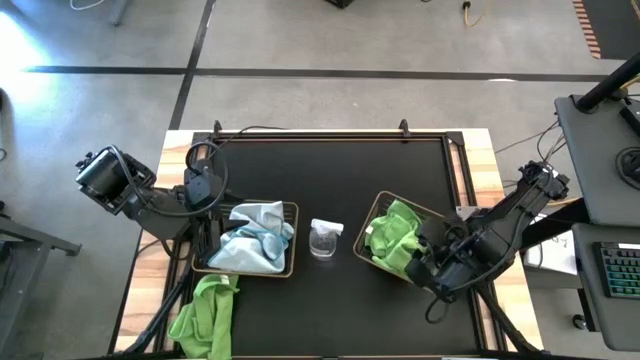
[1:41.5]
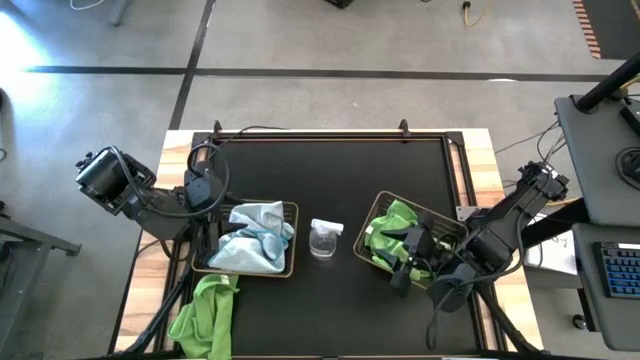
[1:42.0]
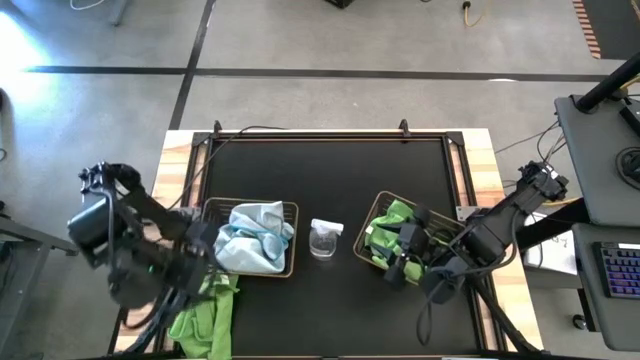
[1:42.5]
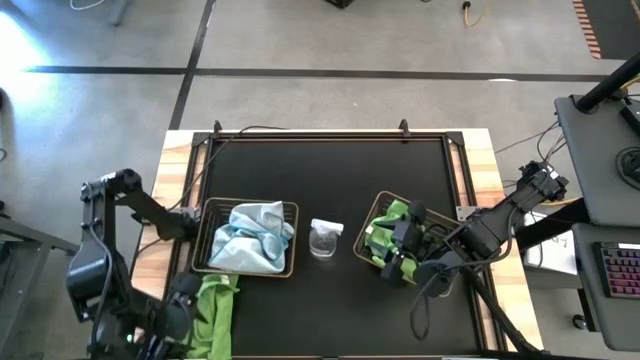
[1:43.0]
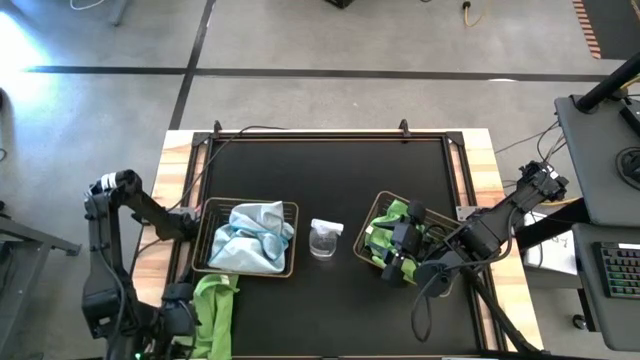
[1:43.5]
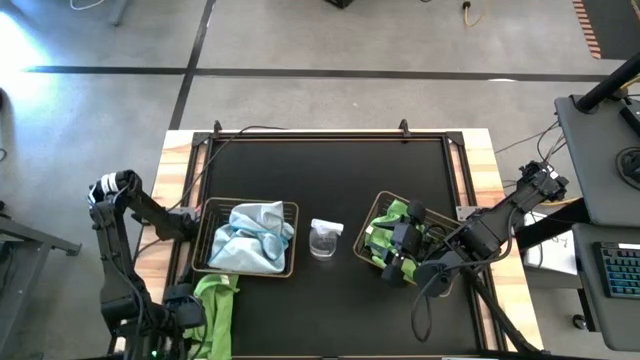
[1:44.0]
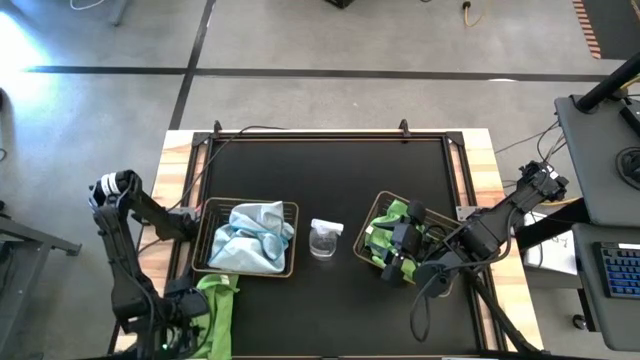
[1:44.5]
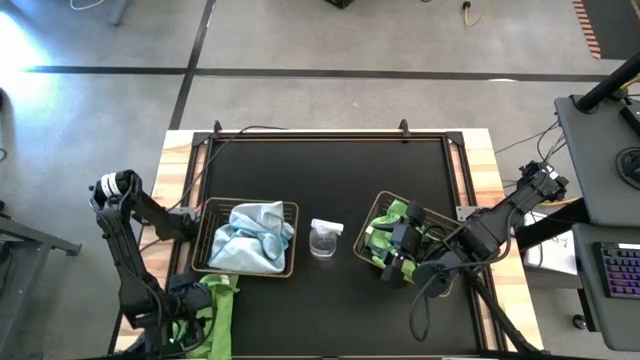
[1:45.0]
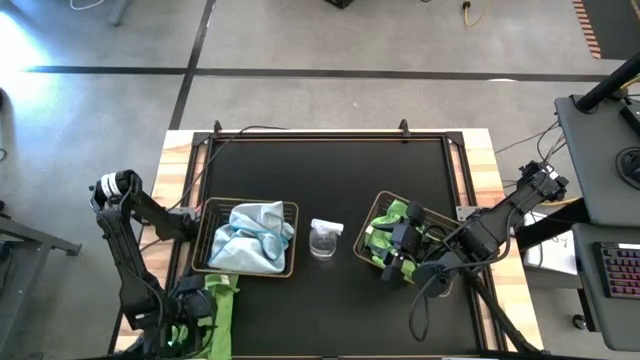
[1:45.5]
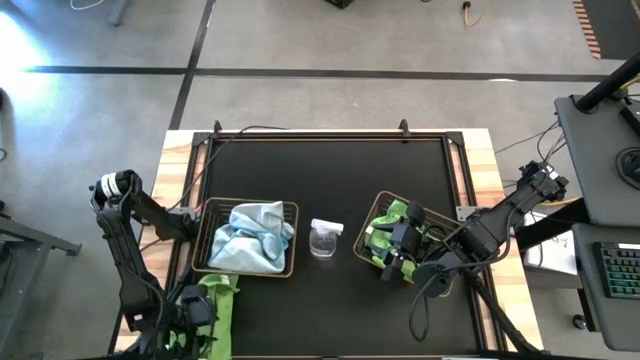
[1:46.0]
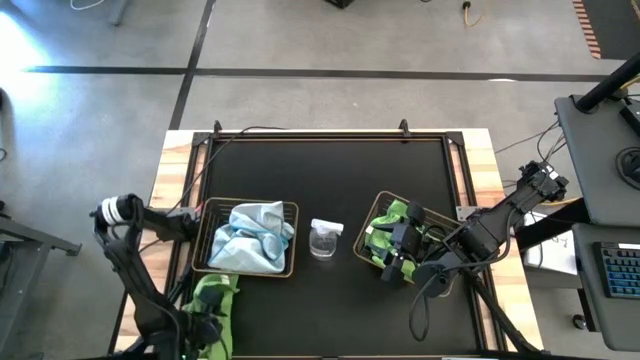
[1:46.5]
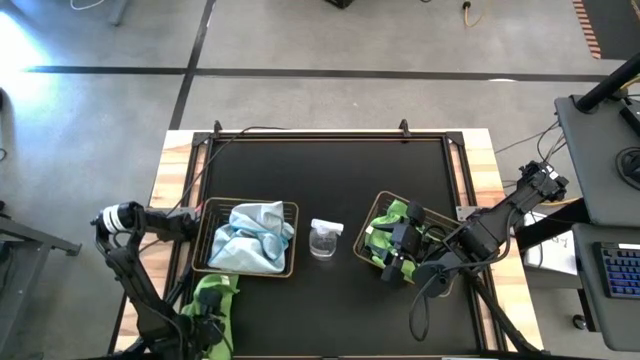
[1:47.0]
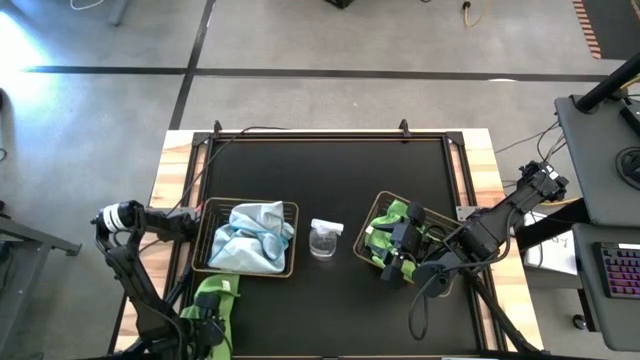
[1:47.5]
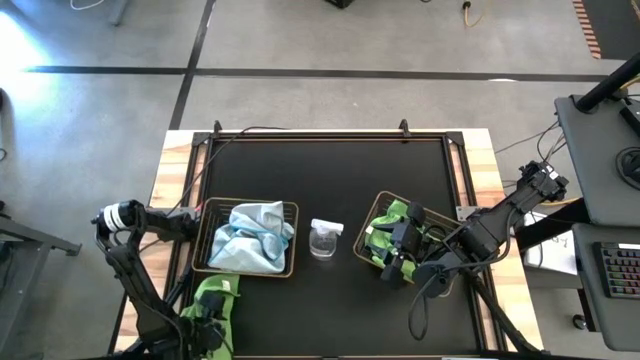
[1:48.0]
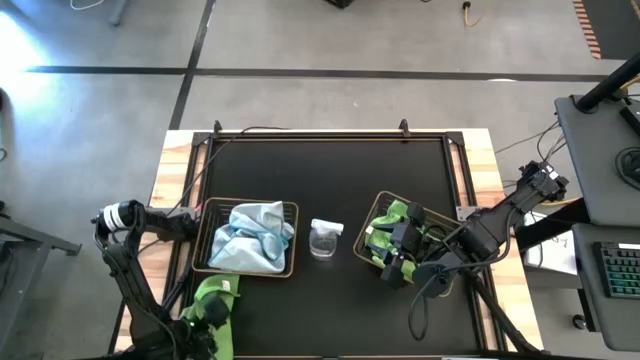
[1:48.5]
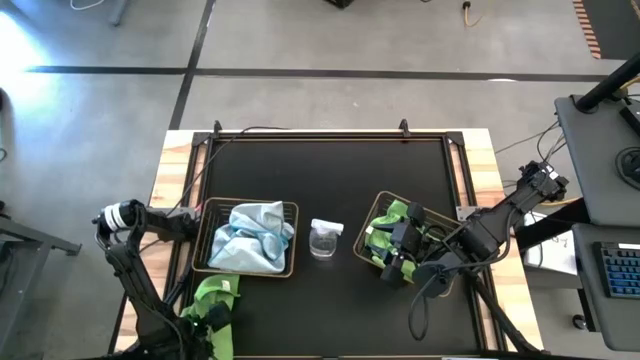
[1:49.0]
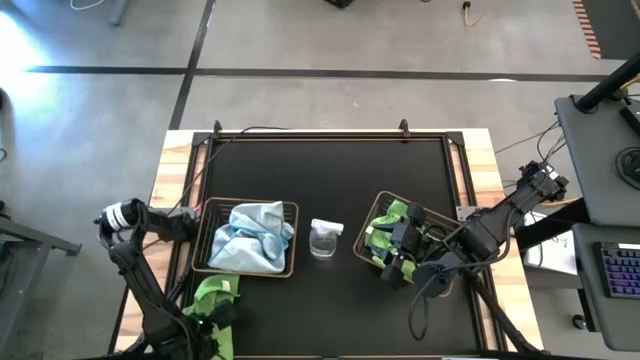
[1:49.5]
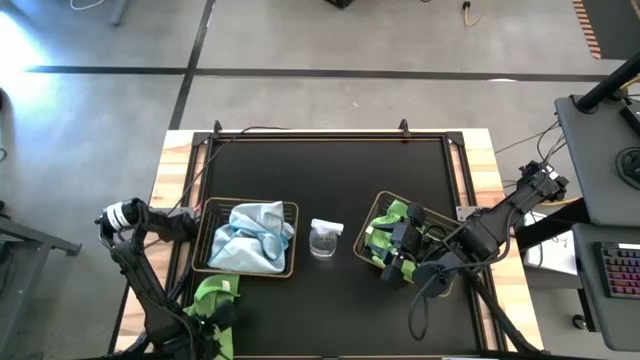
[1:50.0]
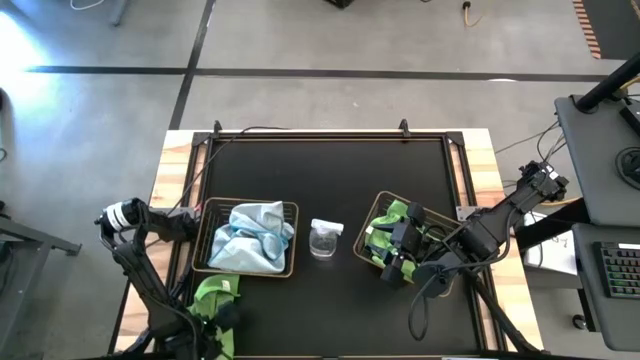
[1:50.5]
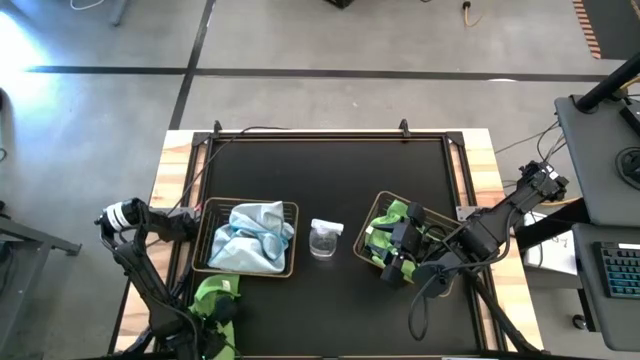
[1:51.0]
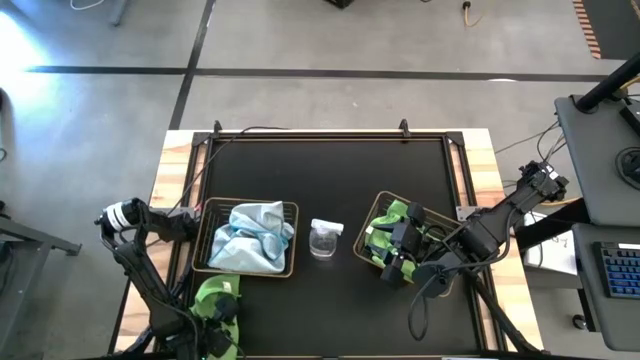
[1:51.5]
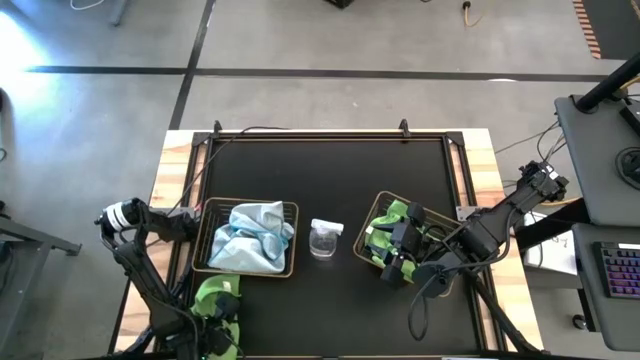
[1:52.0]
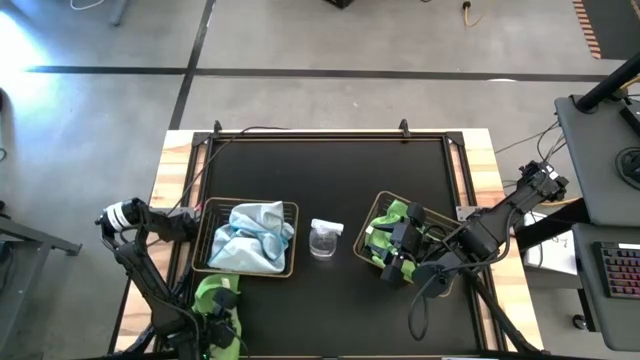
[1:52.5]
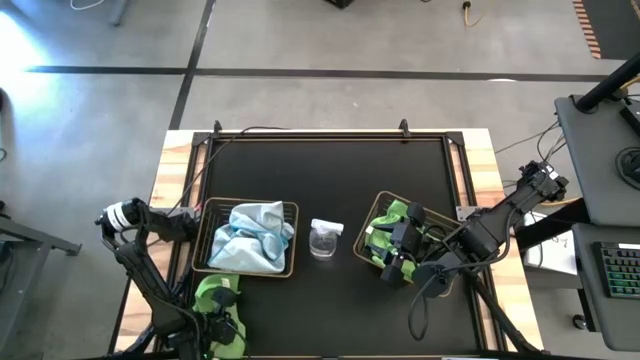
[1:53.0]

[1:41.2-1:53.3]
Task: Sort microfiber towel by color & place in baskets
Put the green microfiber towel into the right wire basket

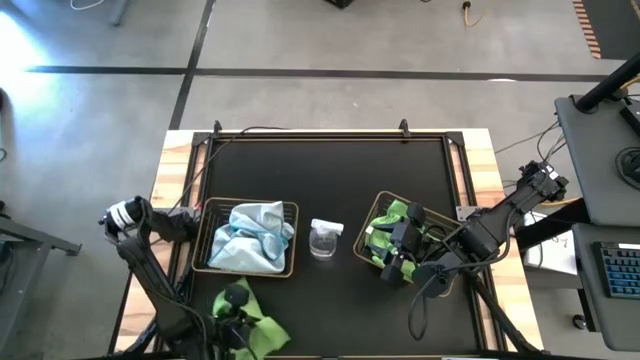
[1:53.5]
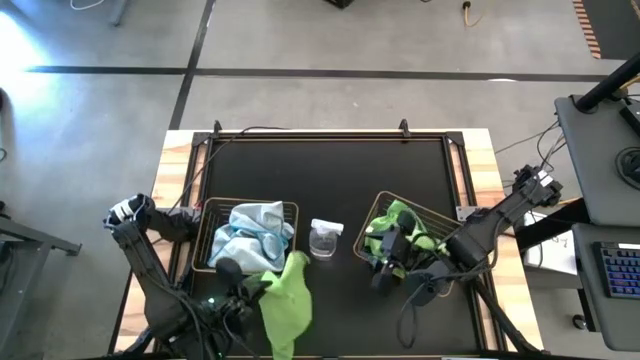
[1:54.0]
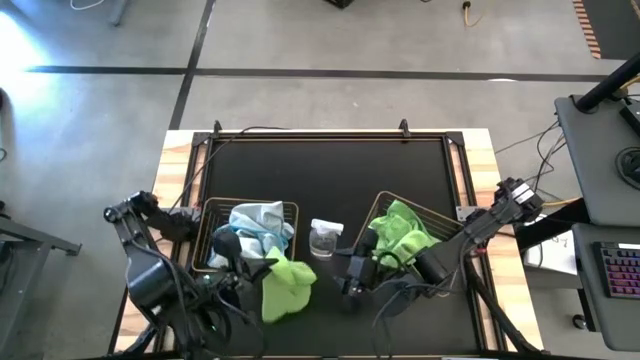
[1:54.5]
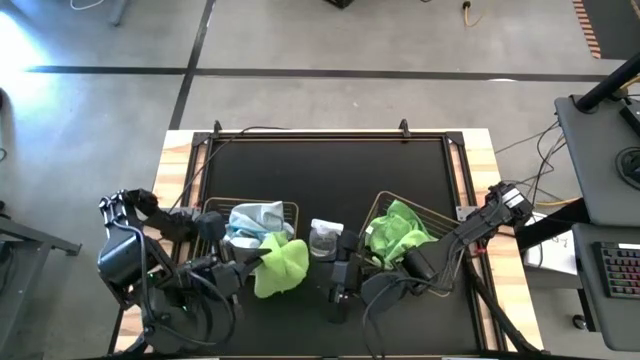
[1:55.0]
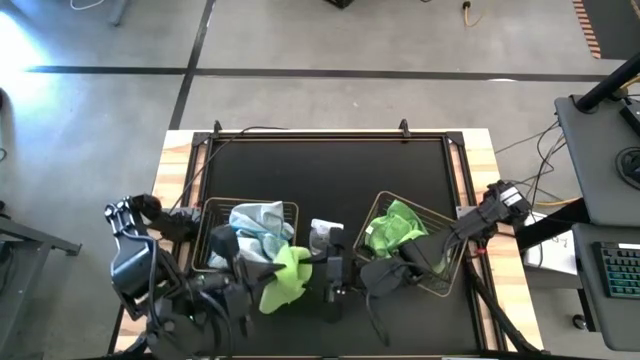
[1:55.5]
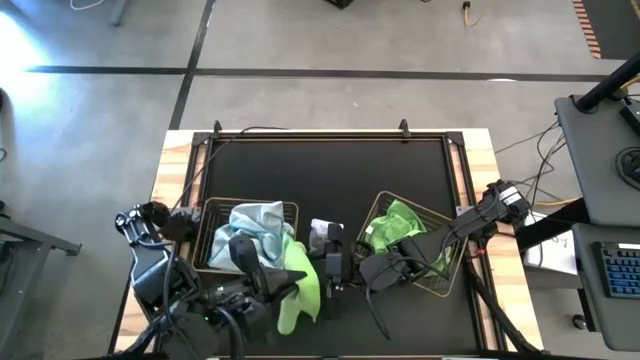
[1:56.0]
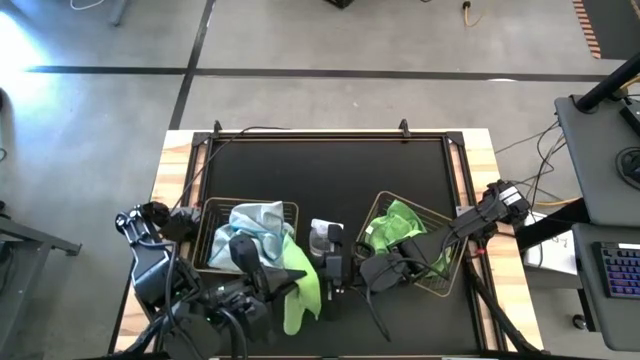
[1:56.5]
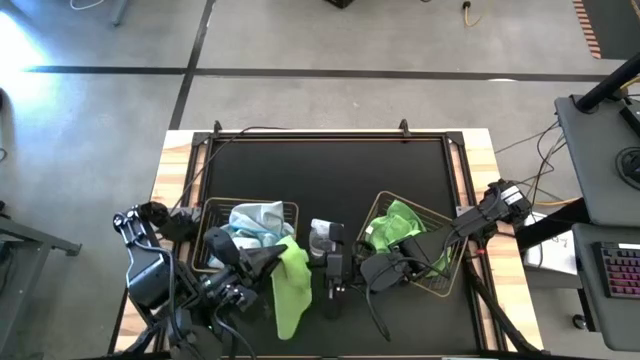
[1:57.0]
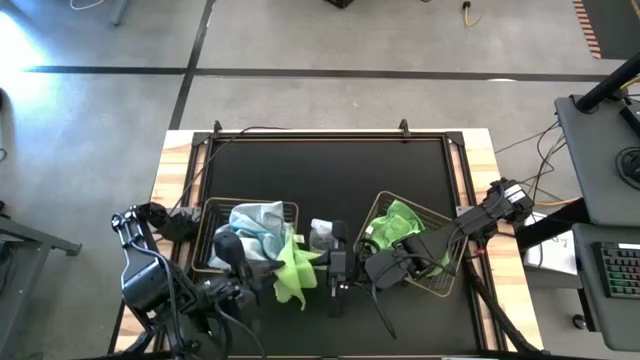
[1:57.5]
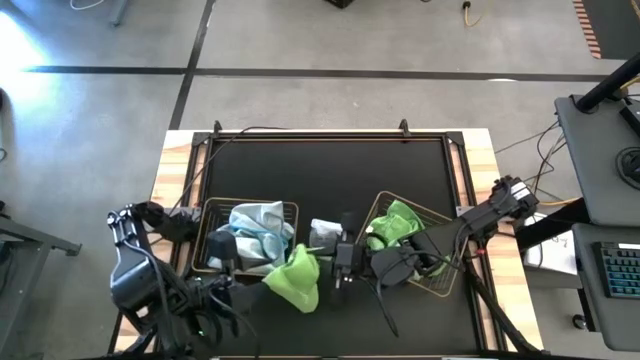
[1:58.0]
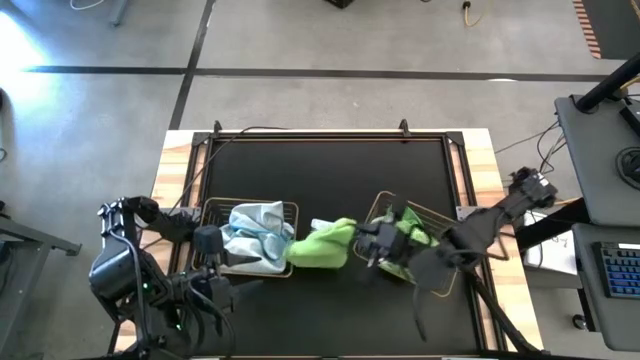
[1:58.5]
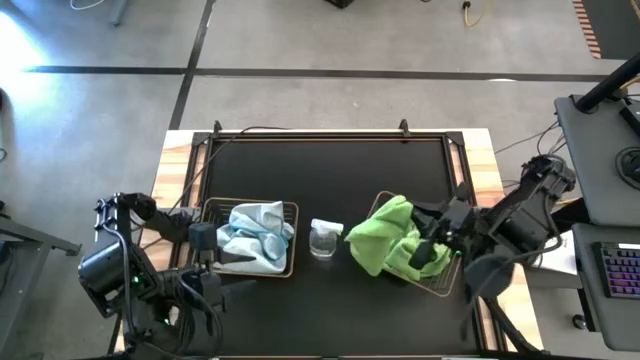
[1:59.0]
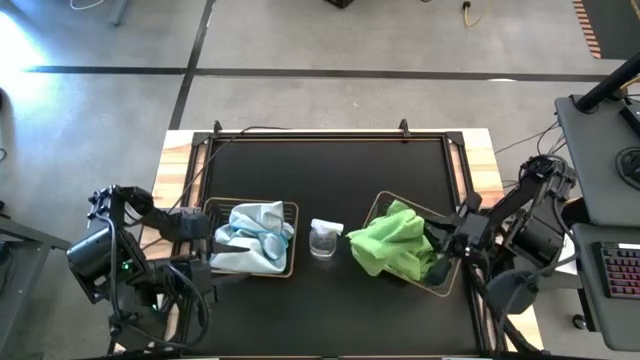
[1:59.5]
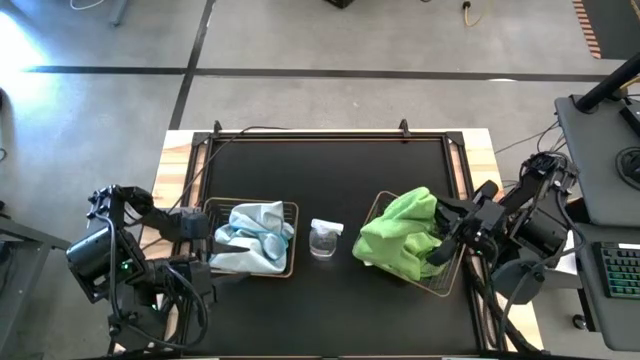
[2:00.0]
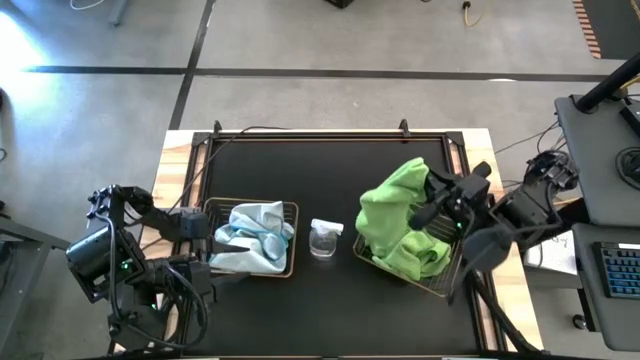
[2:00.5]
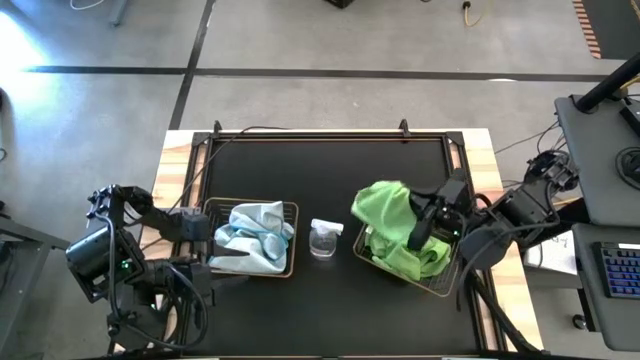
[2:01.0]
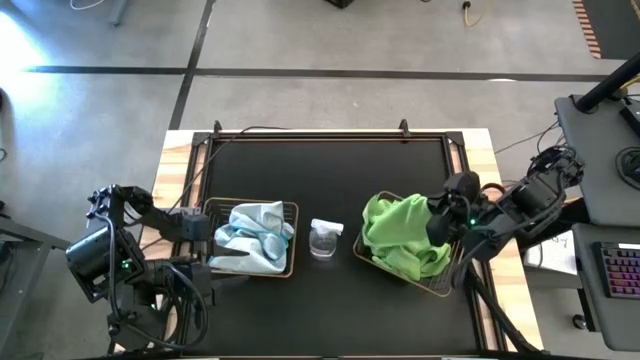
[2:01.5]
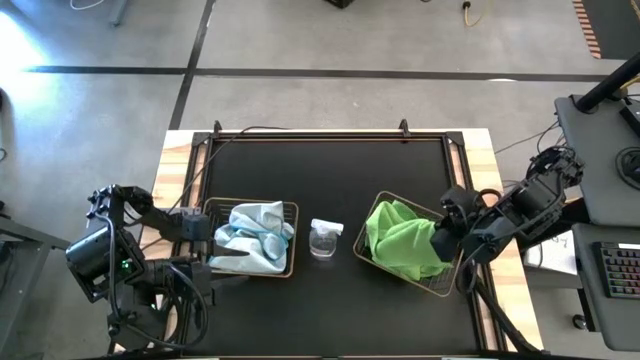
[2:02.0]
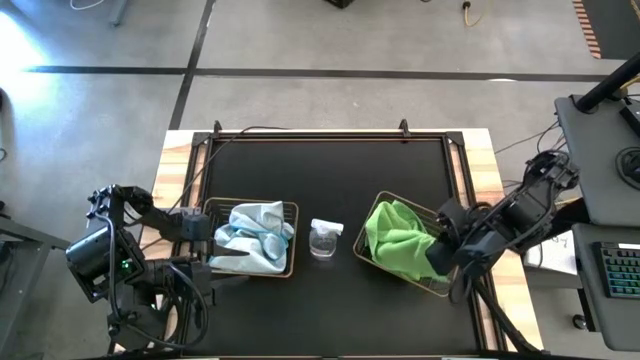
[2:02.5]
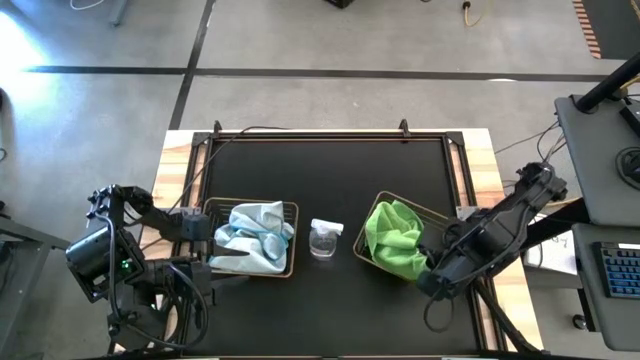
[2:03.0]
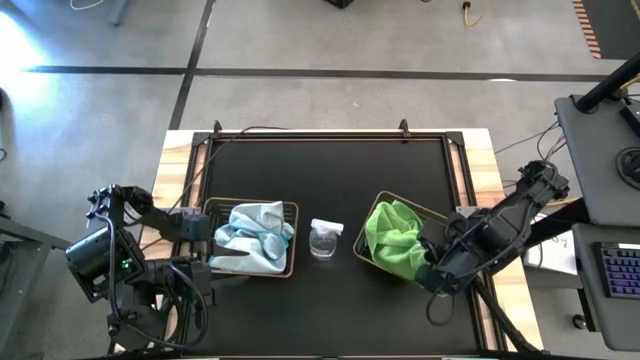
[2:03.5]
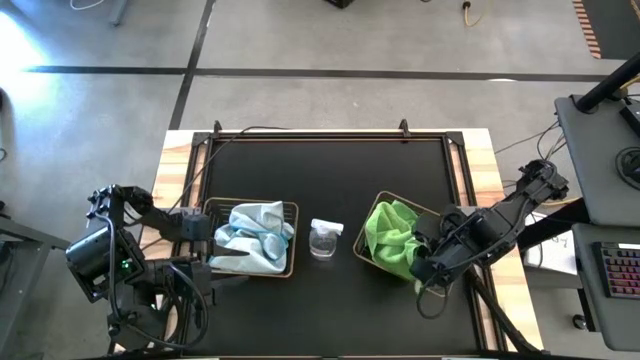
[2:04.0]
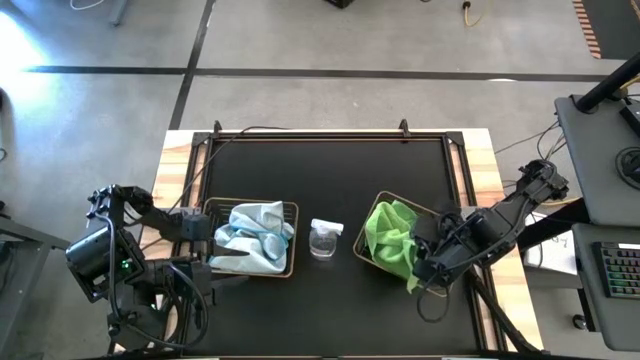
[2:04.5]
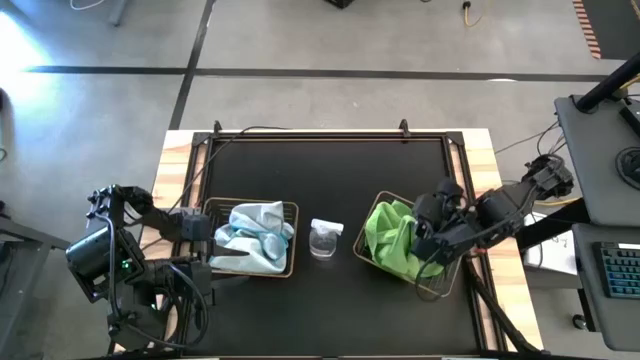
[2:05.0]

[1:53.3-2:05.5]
Put the green microfiber towel into the right wire basket
